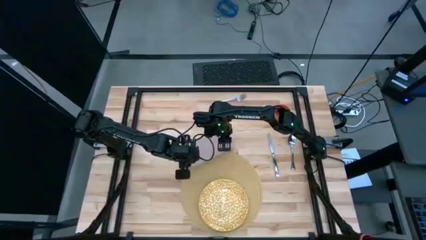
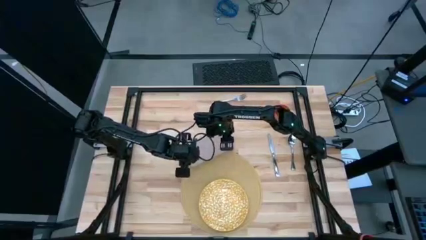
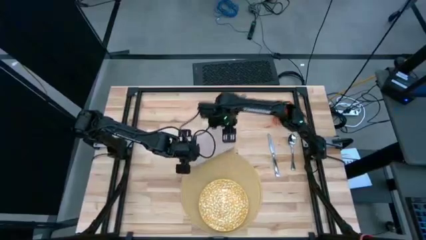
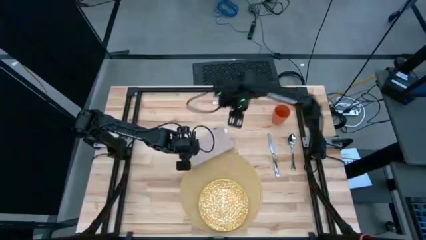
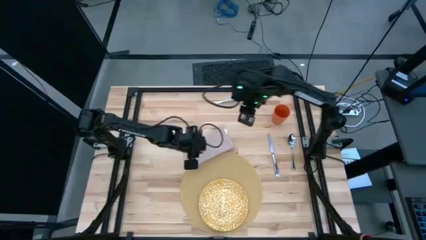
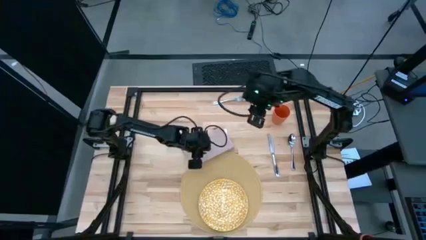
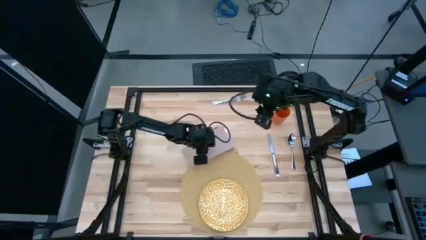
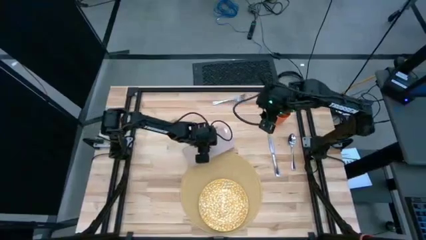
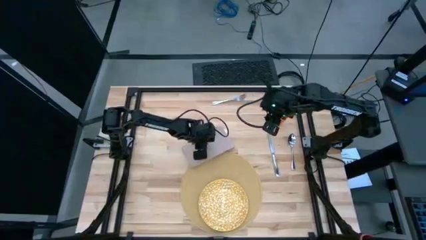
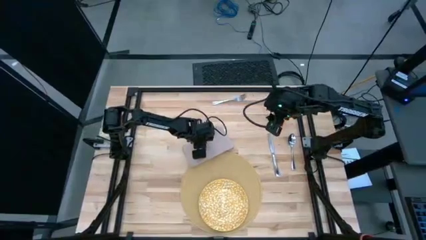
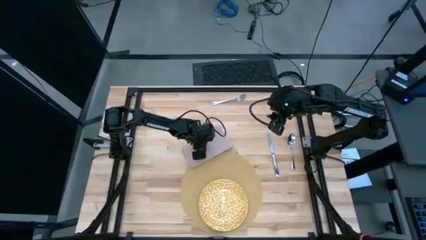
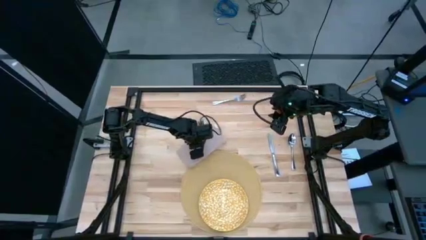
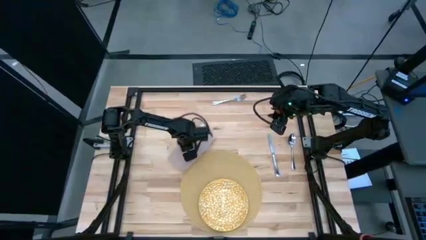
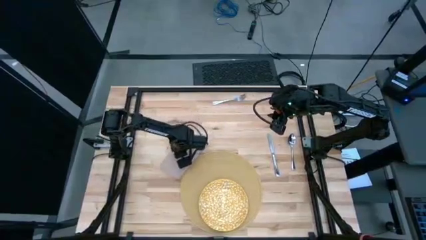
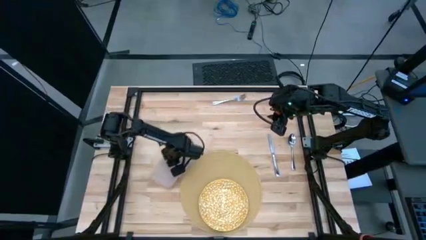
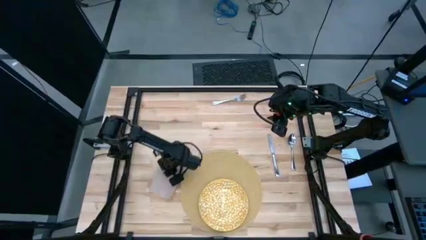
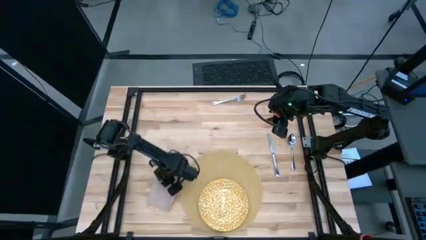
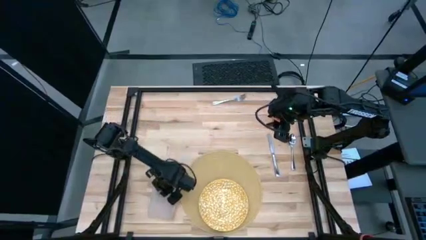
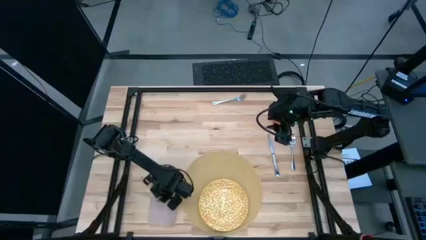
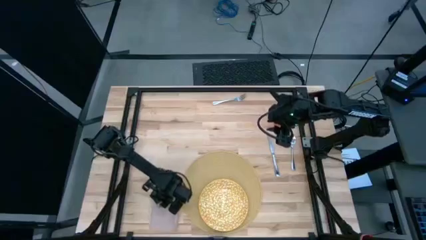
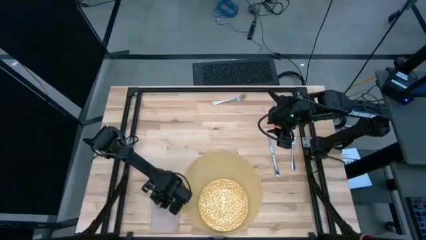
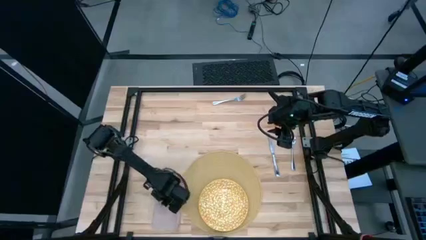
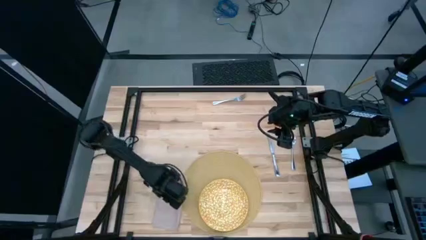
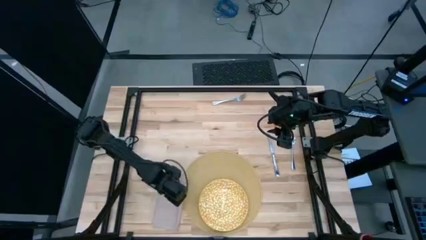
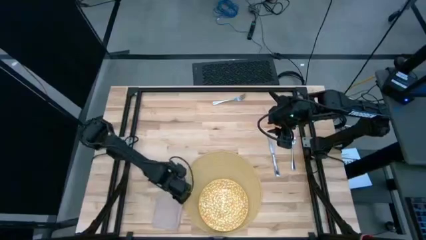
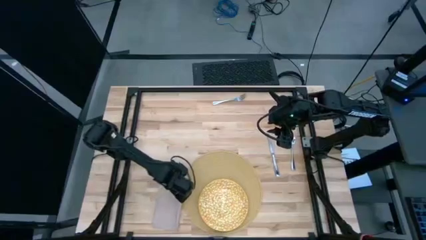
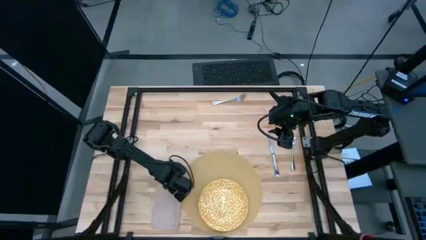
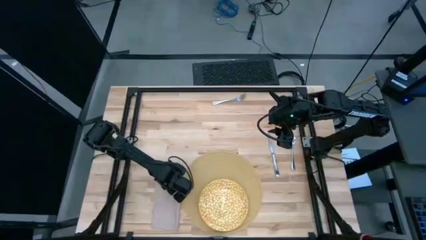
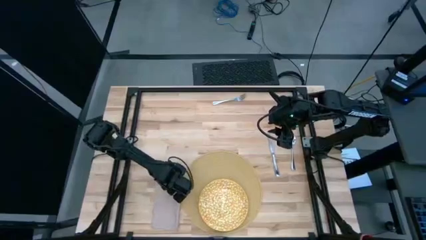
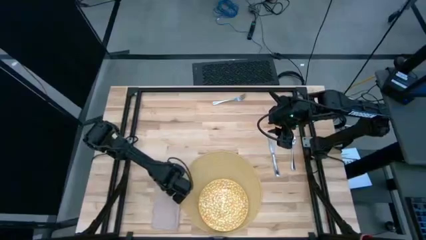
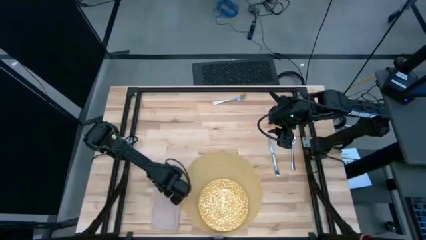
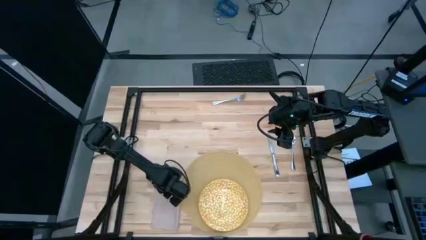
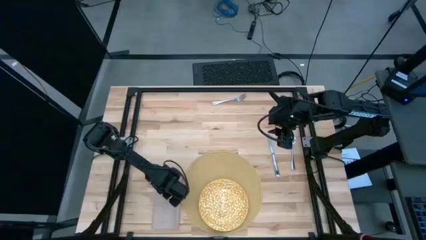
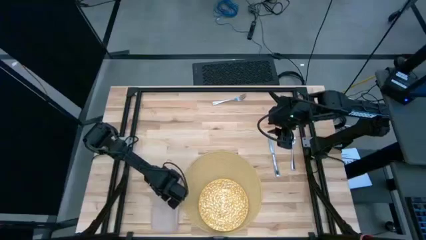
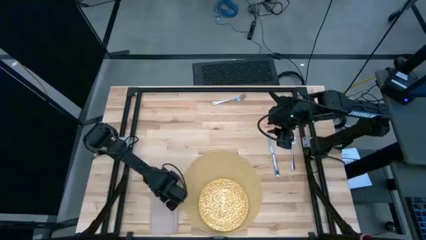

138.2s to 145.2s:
Task: Set table place
Move the brown table napkin to the left of the table mat

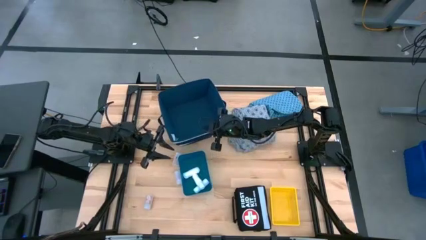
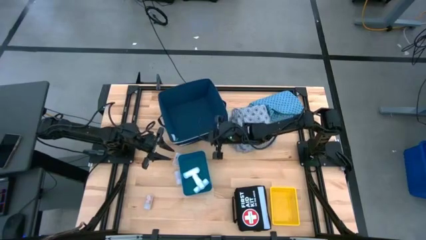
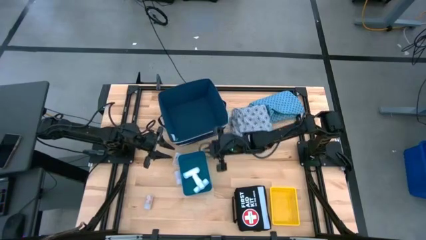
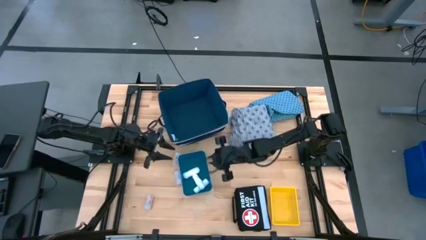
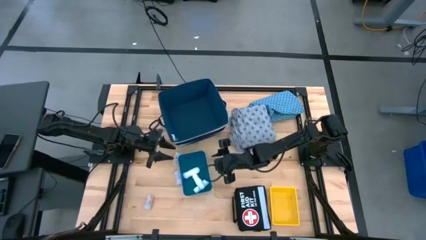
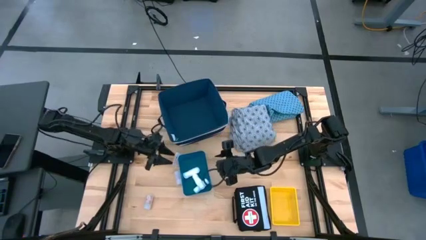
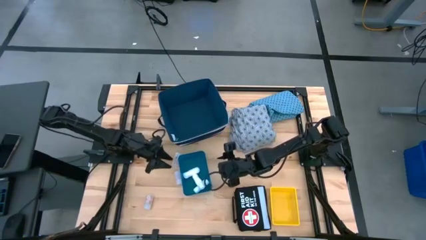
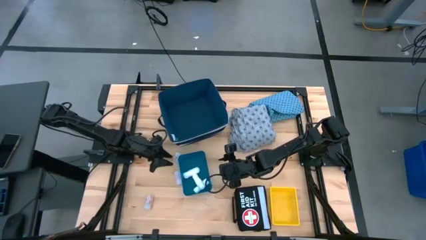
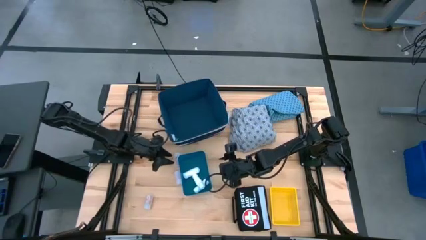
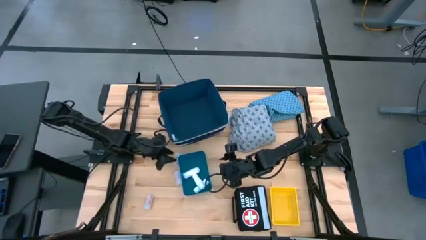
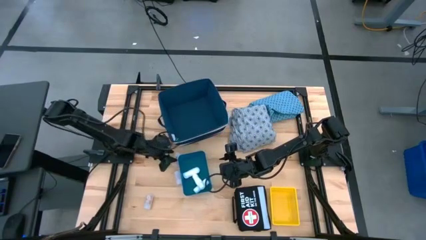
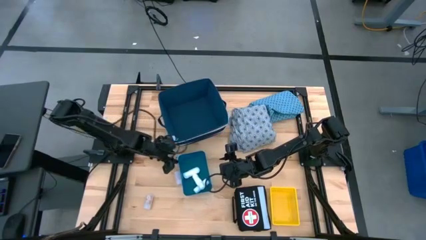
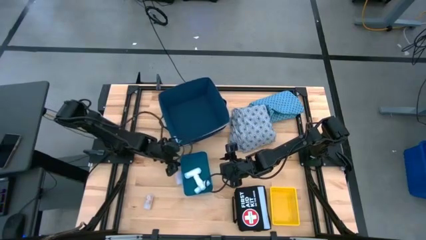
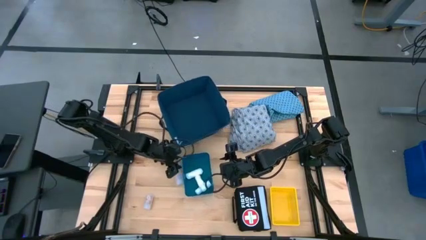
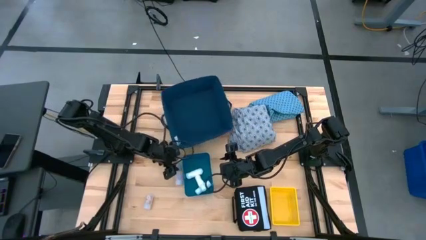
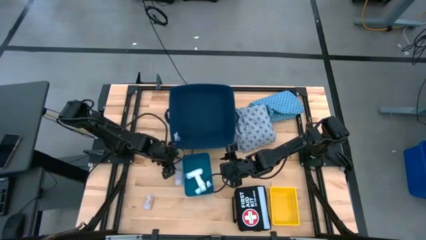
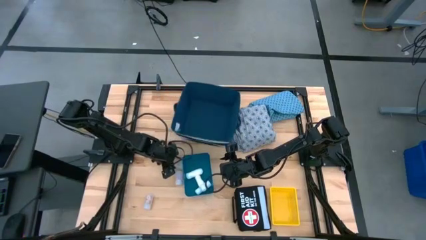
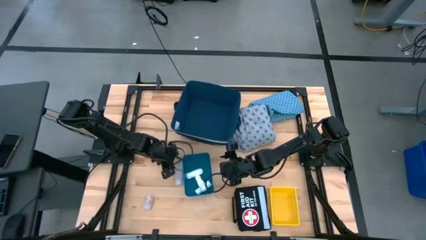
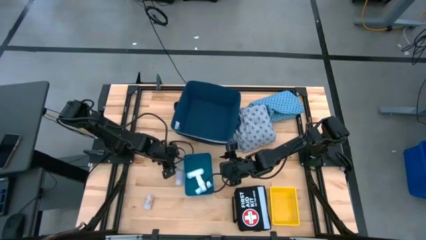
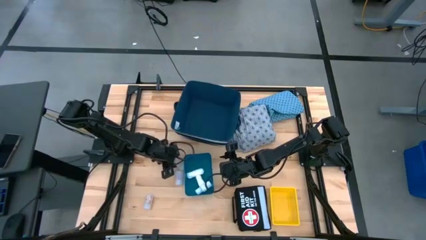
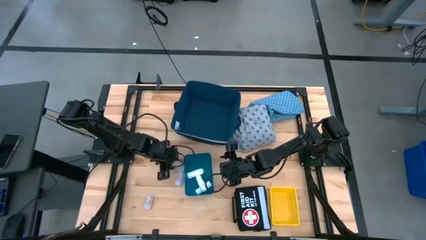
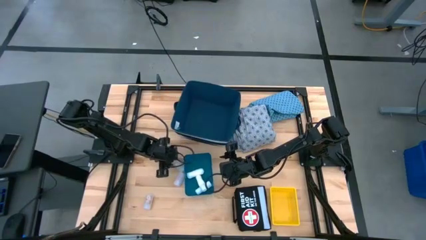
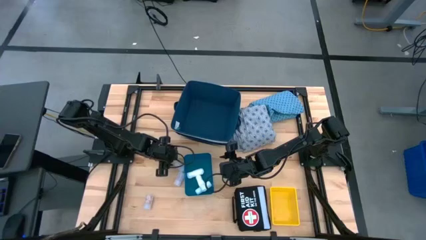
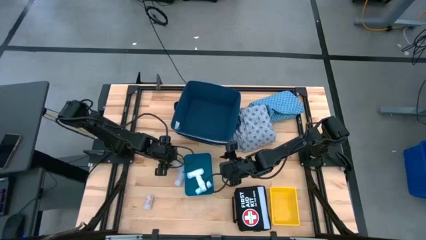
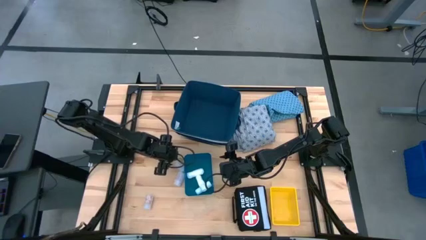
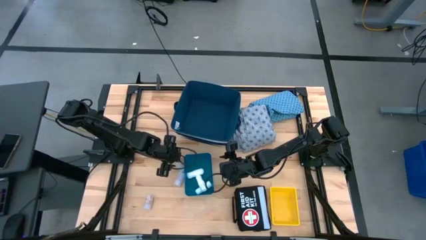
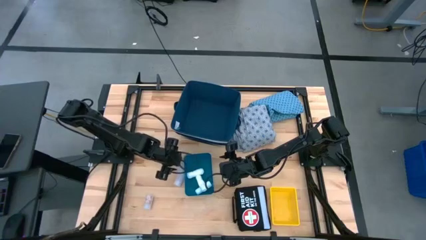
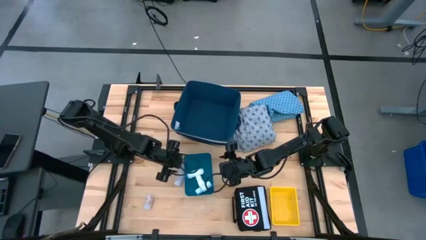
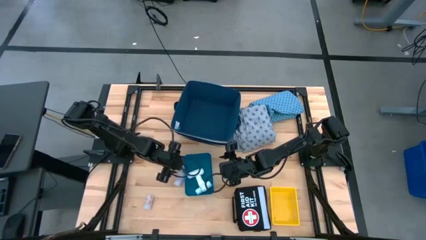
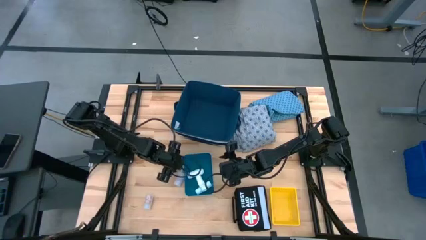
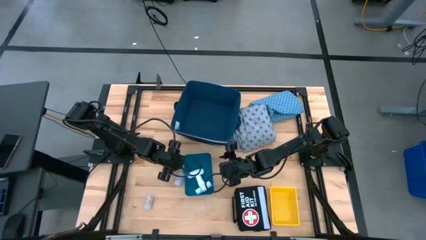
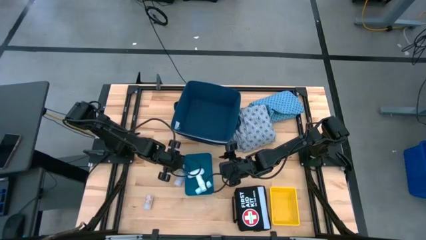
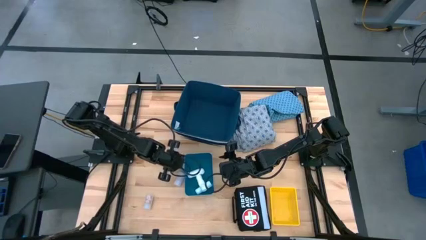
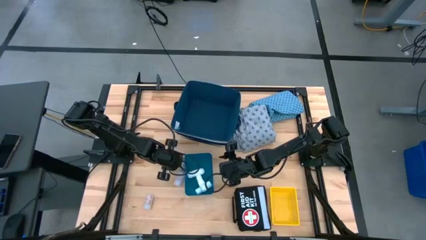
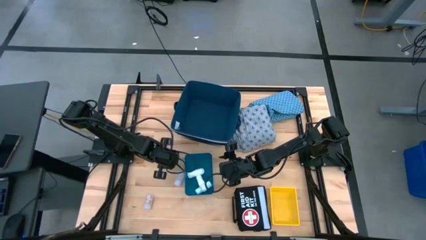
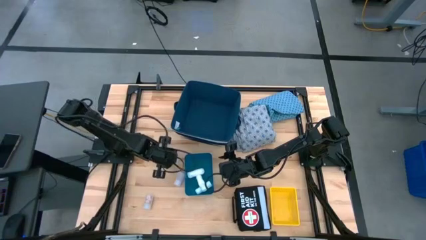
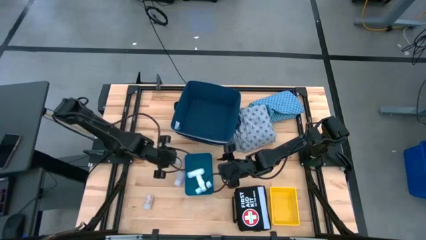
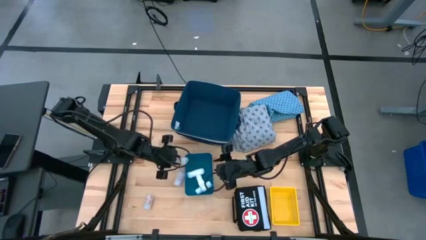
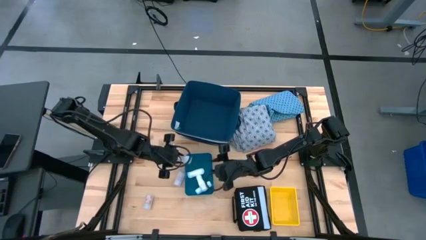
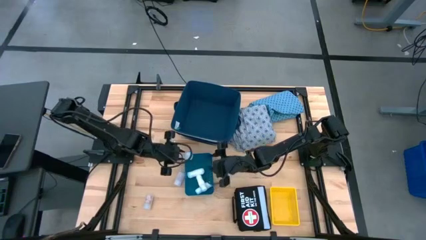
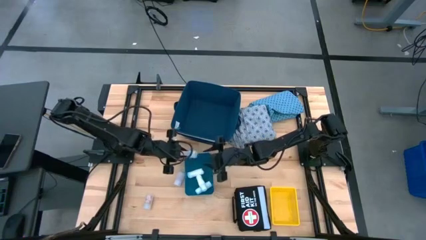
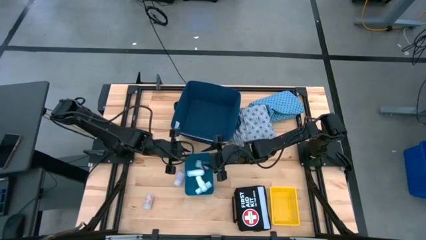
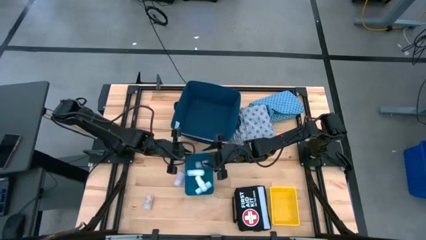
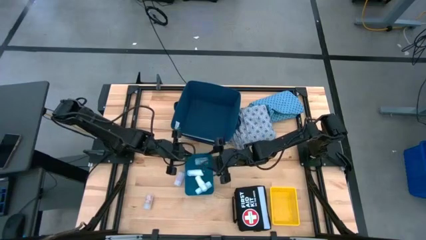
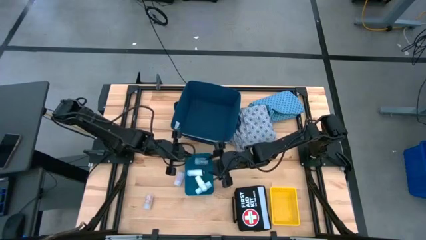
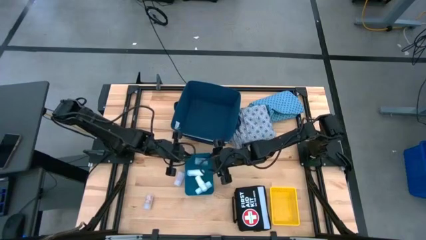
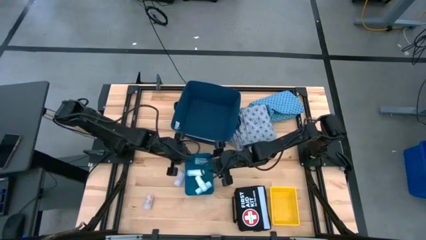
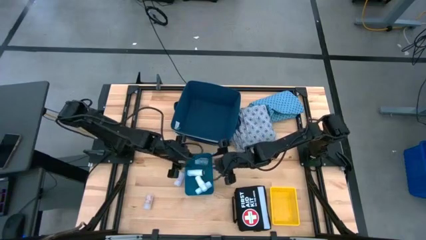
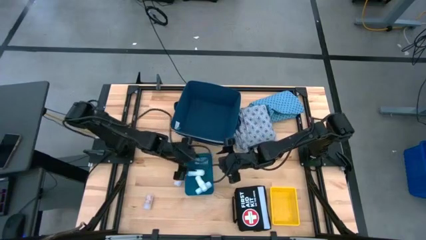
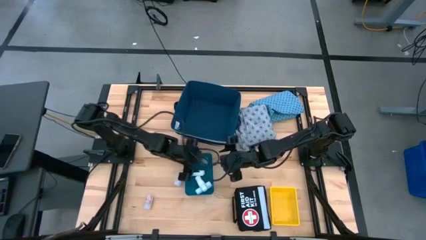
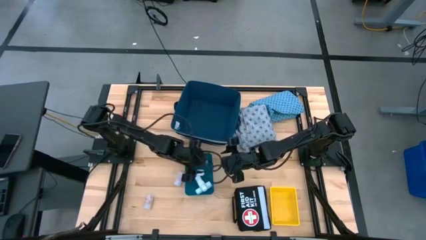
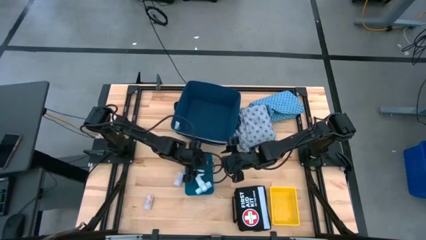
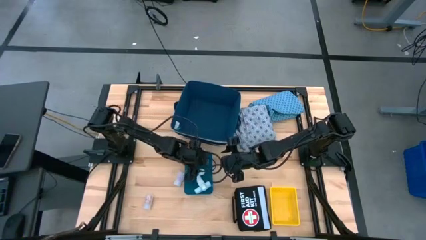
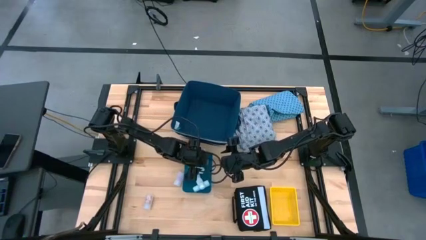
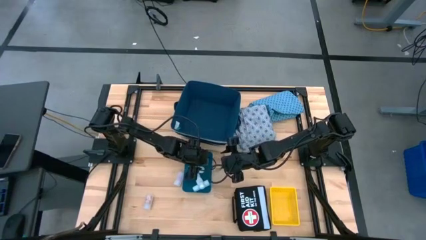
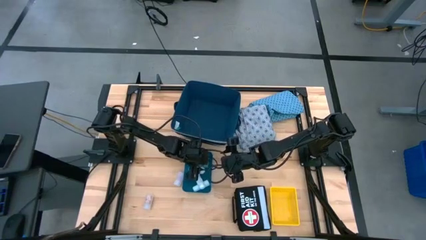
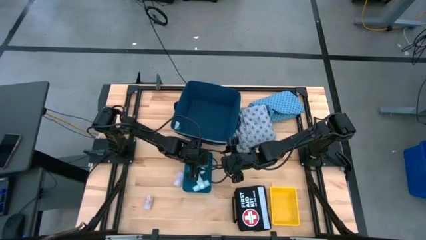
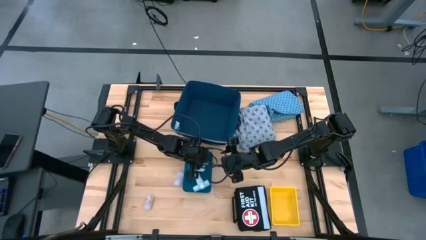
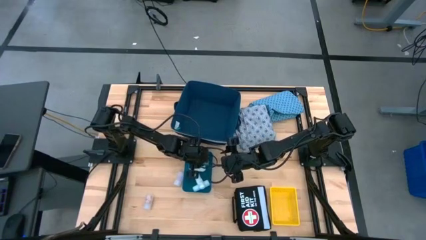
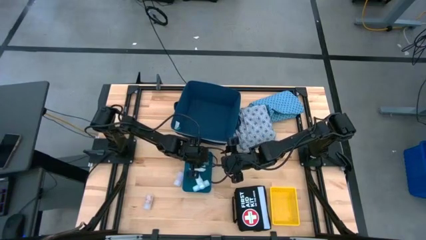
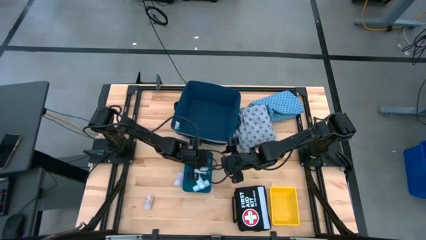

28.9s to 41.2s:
Task: Pick & place medical supplies in basket/bin
Put the top transparent bottle in the yellow bin
